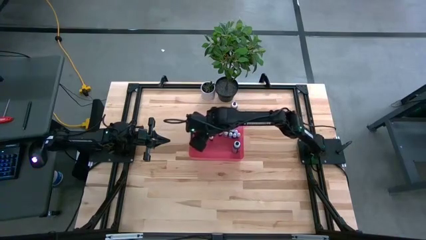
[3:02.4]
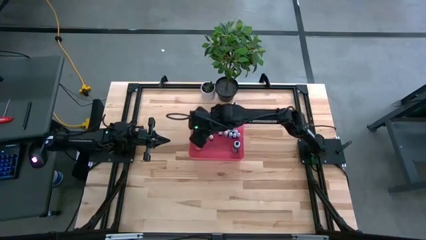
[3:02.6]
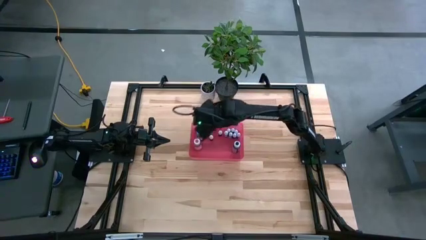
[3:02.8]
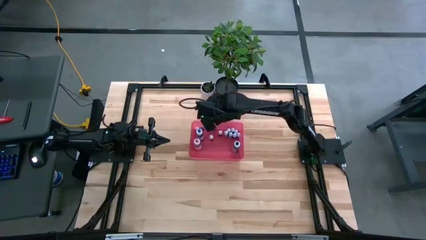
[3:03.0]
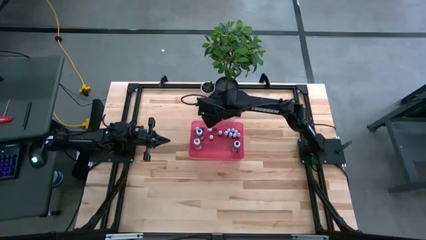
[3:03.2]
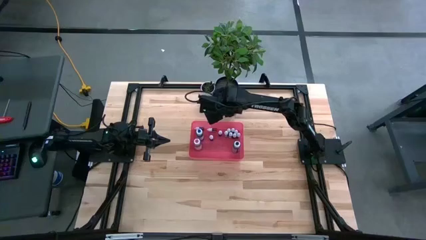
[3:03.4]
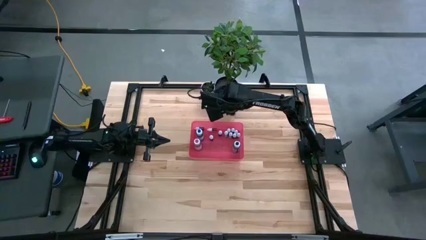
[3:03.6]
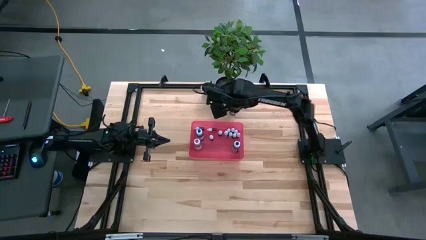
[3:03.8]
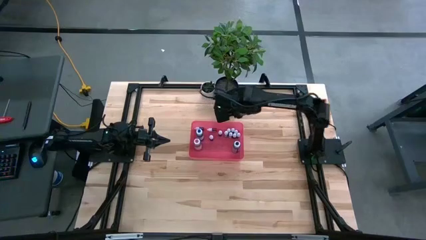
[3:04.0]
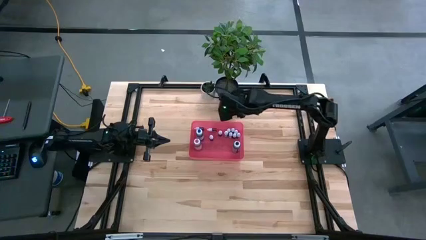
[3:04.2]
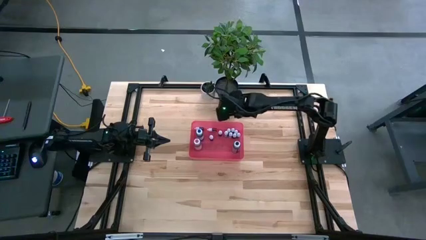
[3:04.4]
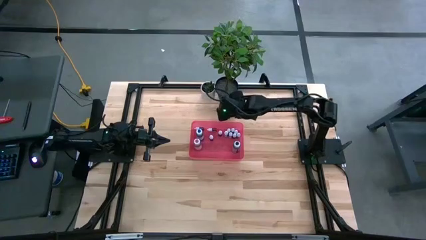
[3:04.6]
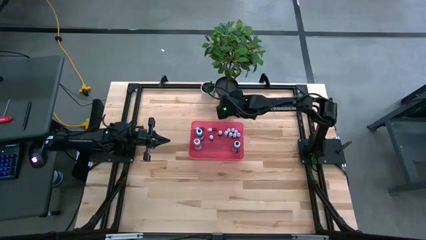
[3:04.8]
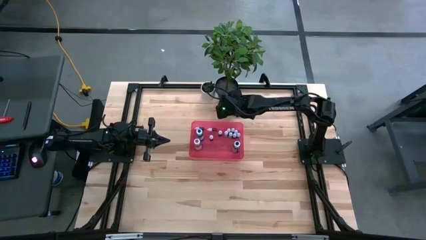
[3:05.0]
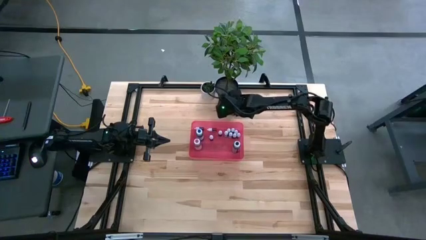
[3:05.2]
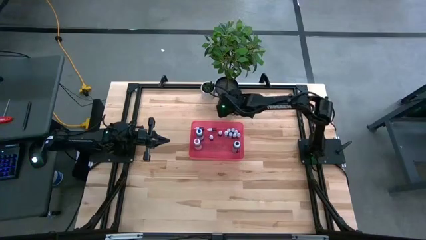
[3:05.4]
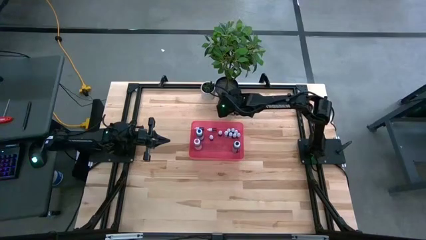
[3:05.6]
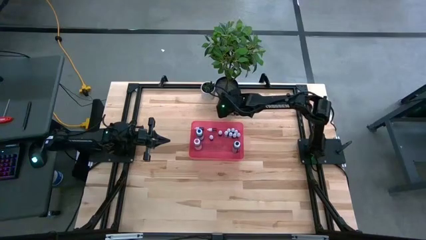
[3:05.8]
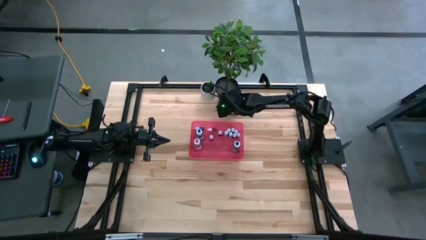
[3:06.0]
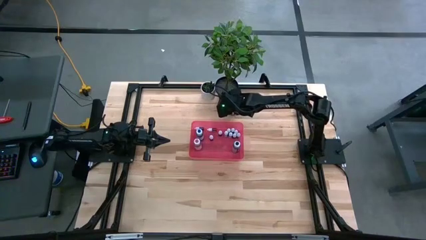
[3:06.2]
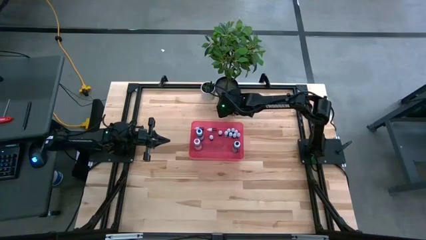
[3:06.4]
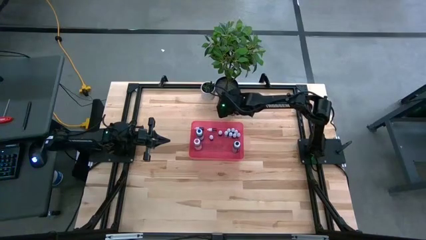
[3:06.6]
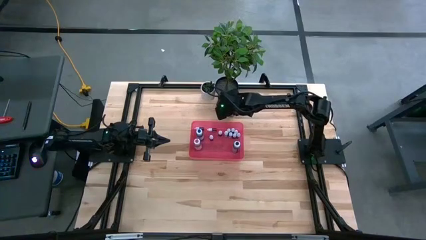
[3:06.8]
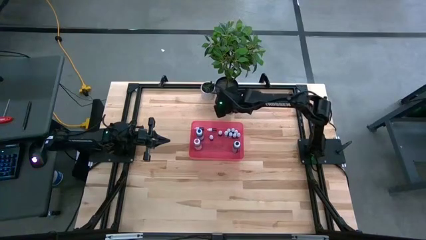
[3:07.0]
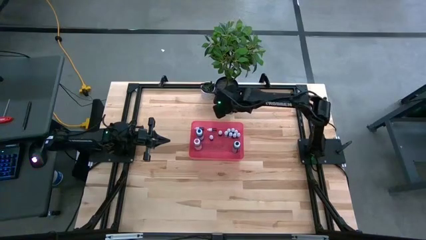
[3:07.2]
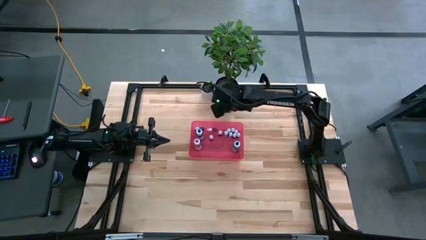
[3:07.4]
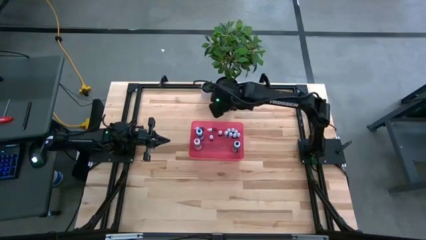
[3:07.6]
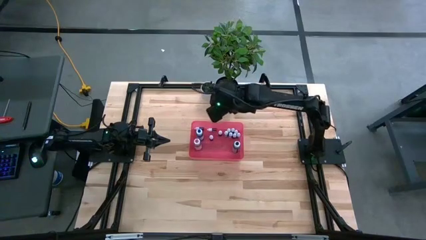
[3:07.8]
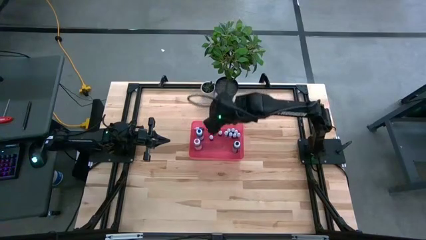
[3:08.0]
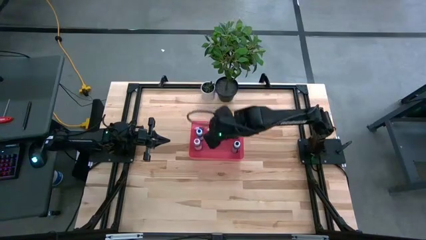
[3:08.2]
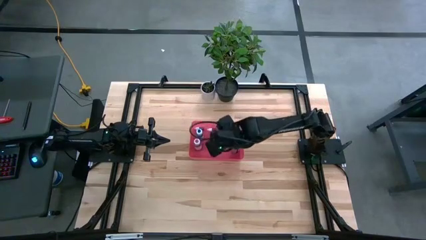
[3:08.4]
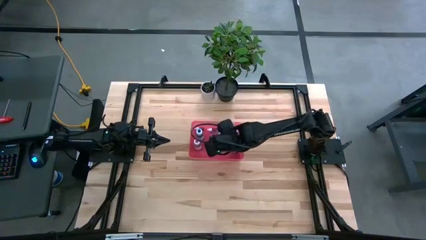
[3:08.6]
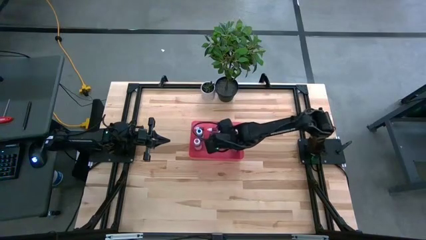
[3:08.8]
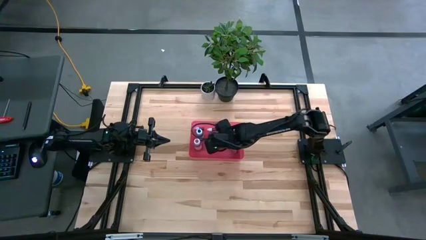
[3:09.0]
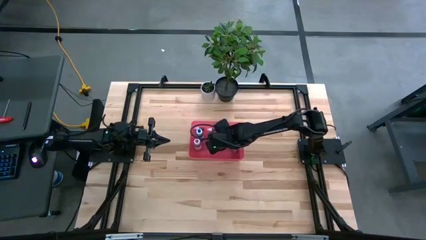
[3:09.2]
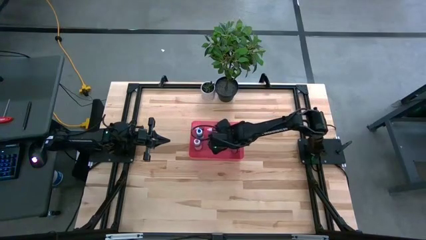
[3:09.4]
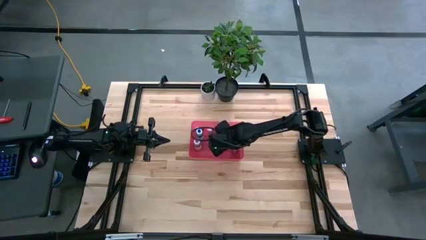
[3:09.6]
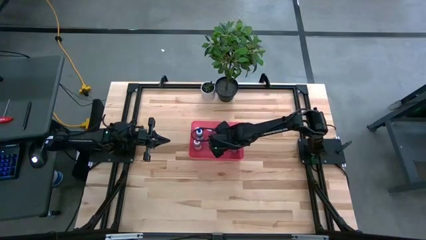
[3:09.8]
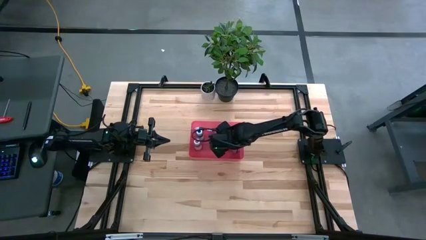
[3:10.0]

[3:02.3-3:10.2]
Task: Pick & Place food coloring
Put the large violet food coloring bottle into the pink container

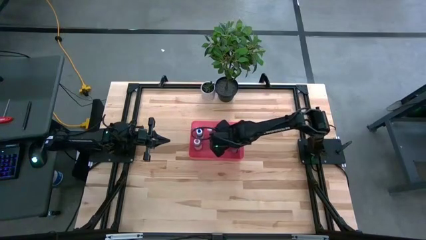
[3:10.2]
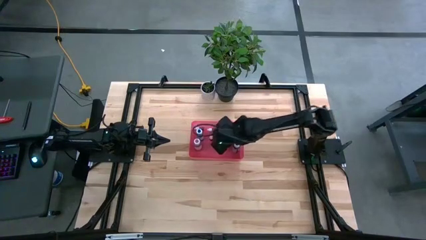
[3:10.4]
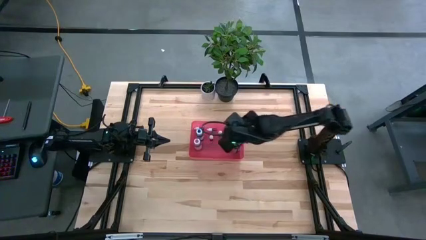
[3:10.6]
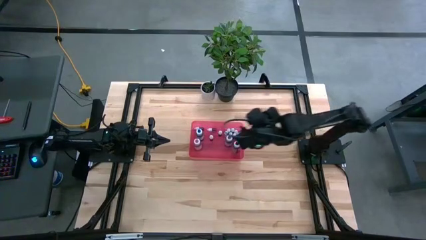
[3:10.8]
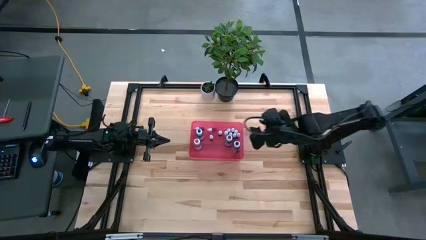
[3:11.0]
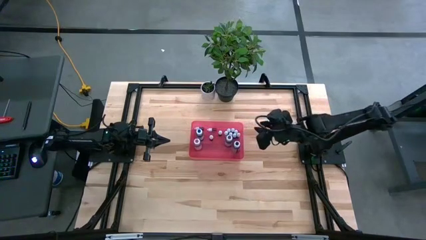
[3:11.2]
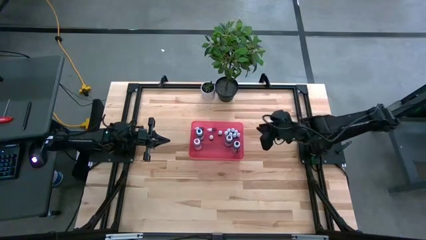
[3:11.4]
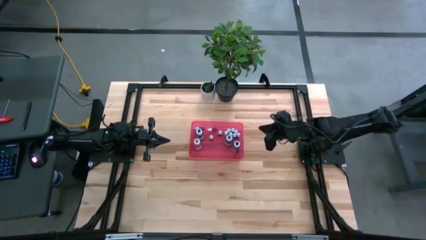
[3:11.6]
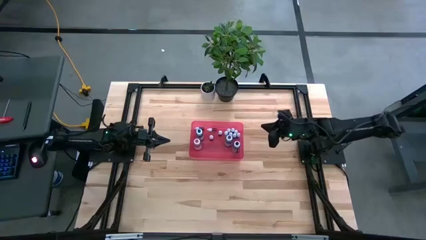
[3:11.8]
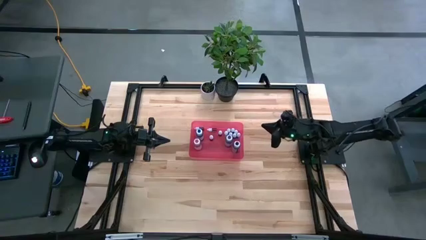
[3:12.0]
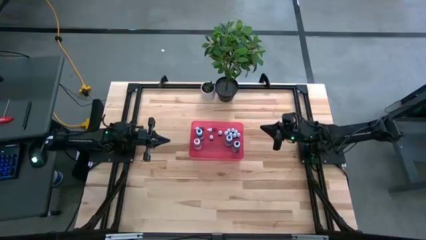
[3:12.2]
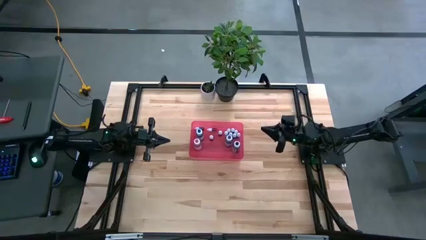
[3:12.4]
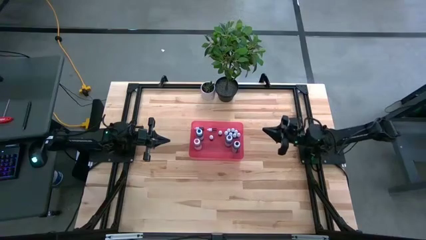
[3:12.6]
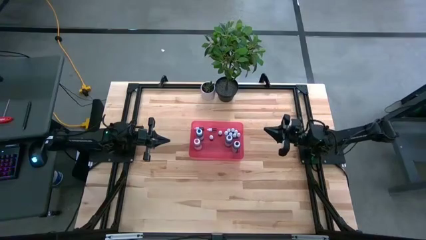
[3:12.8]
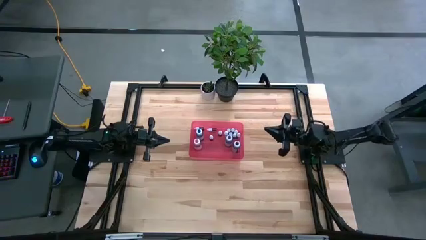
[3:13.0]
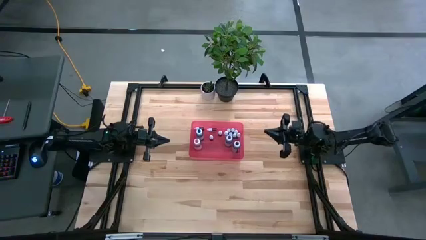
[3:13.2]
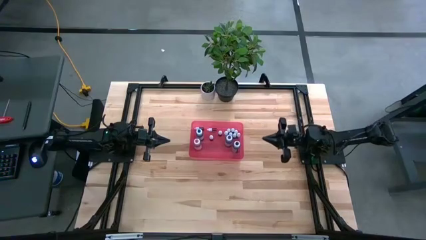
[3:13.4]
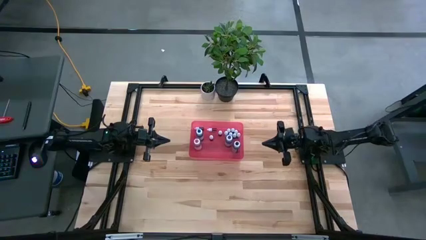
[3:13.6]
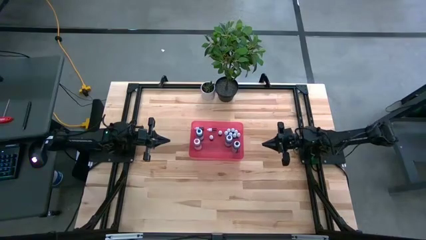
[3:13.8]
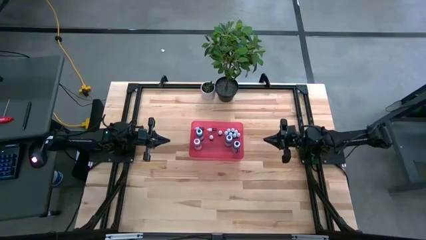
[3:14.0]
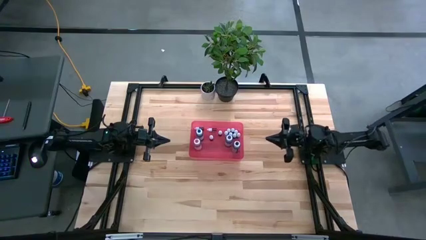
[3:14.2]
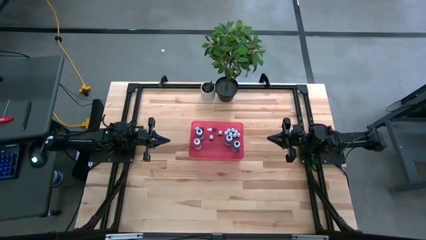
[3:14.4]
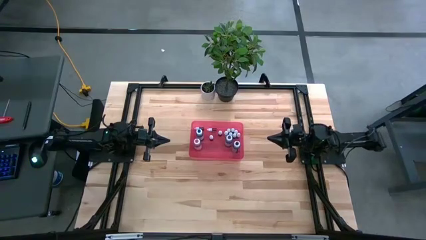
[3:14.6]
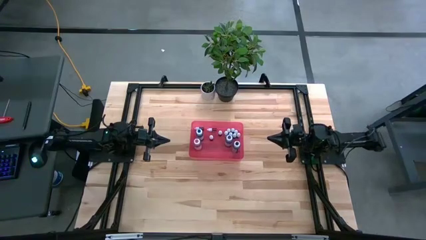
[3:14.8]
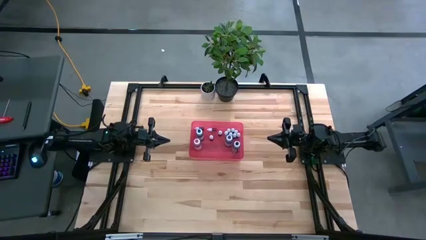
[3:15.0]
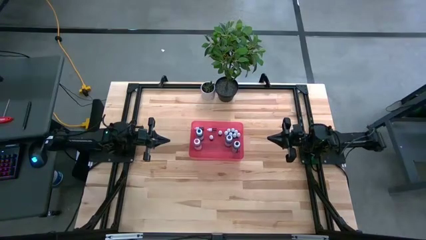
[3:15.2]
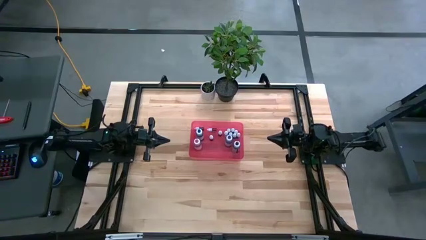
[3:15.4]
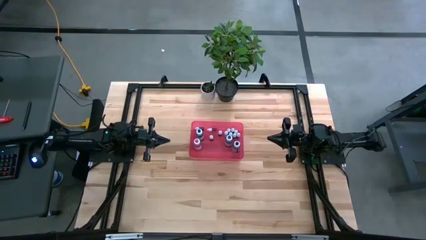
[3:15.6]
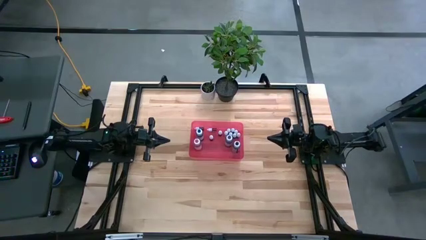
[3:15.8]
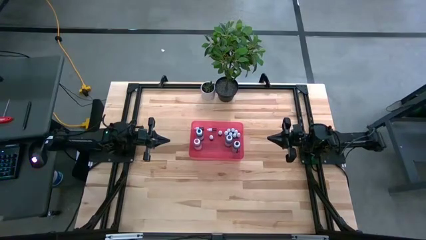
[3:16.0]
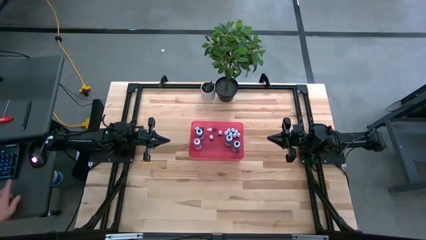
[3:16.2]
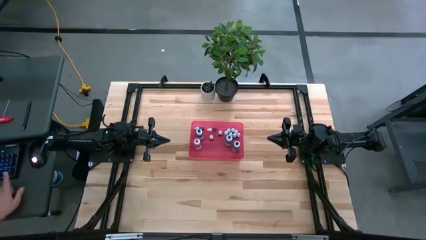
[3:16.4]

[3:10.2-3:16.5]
Return to Home Position
